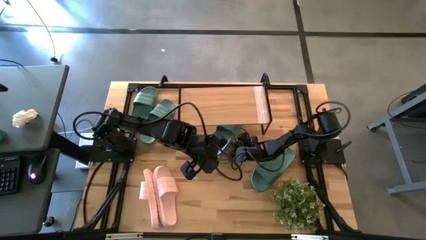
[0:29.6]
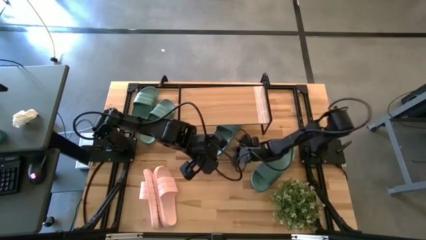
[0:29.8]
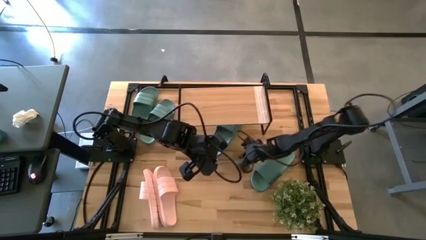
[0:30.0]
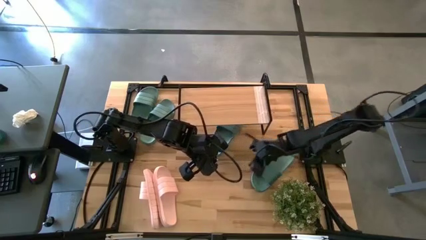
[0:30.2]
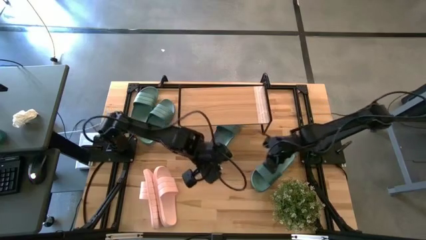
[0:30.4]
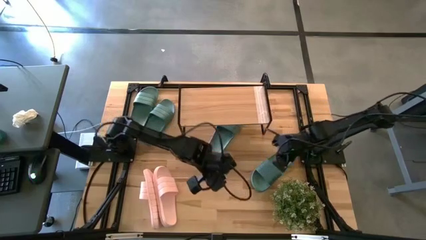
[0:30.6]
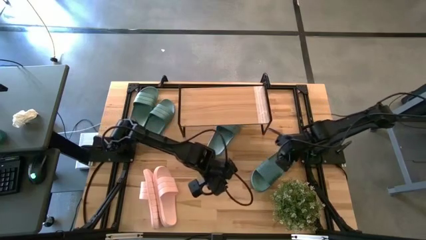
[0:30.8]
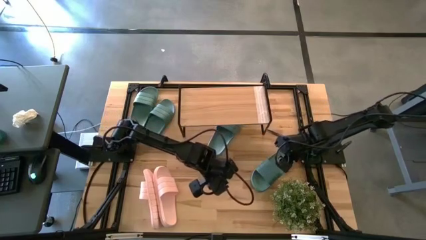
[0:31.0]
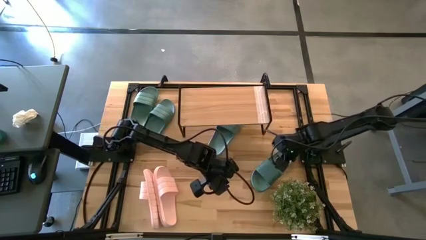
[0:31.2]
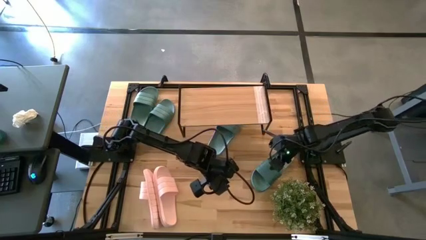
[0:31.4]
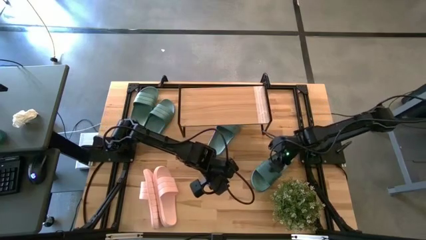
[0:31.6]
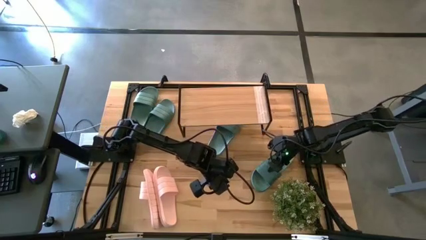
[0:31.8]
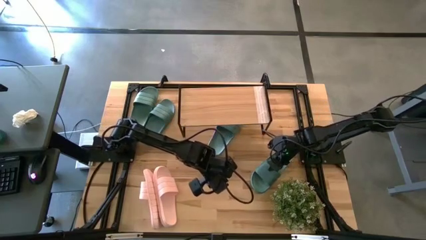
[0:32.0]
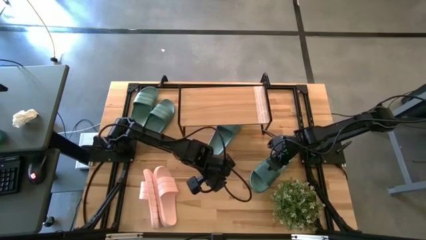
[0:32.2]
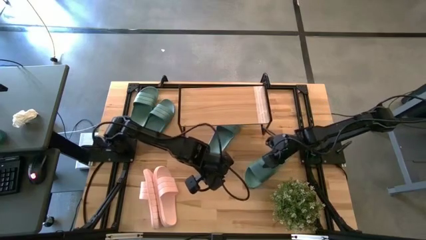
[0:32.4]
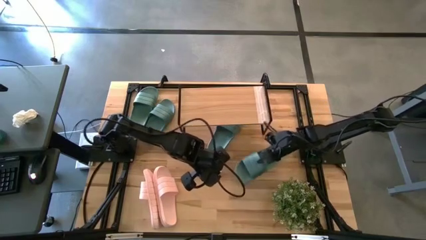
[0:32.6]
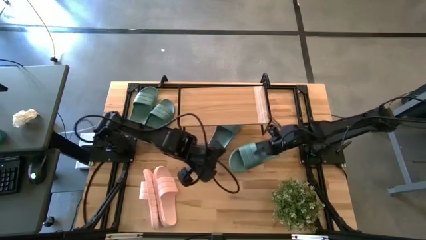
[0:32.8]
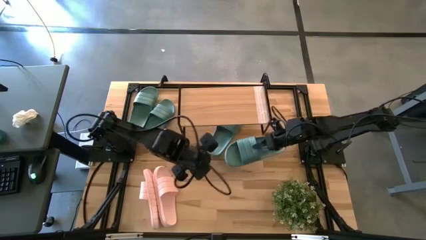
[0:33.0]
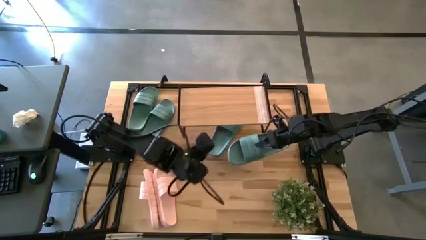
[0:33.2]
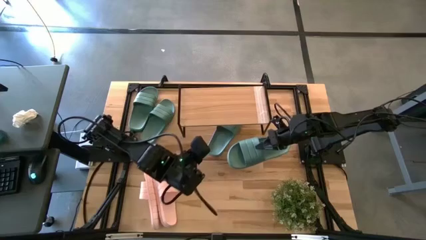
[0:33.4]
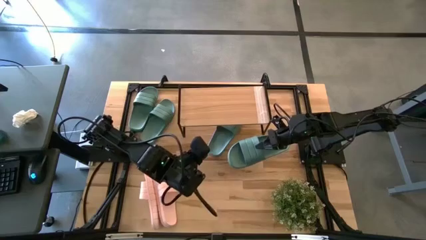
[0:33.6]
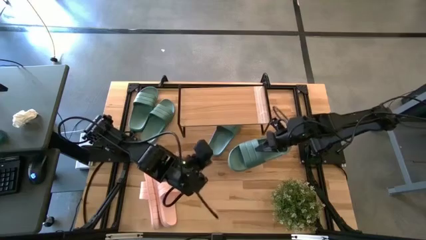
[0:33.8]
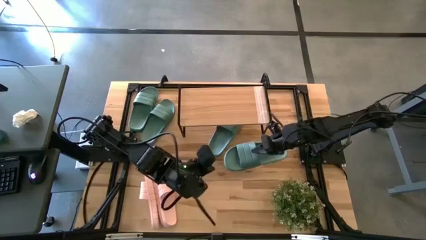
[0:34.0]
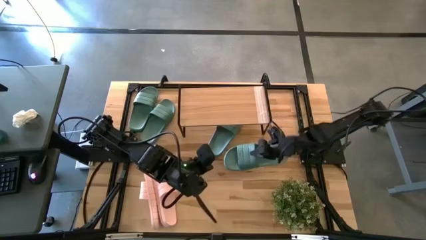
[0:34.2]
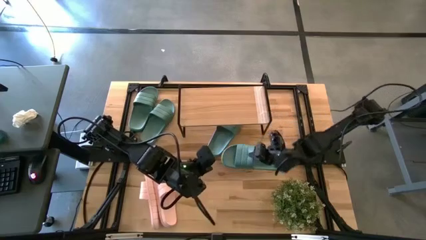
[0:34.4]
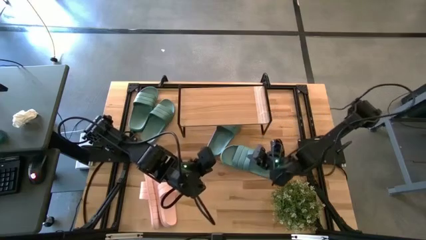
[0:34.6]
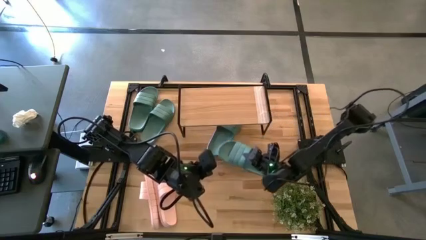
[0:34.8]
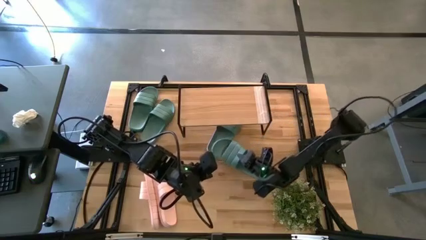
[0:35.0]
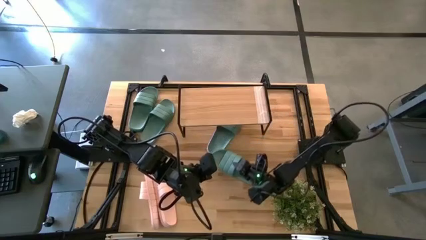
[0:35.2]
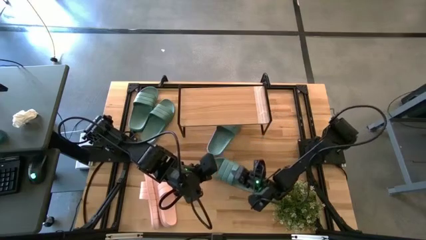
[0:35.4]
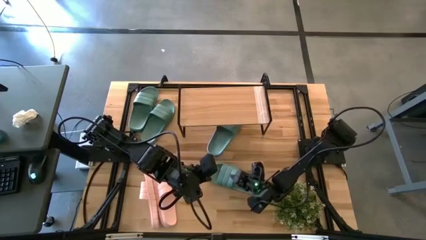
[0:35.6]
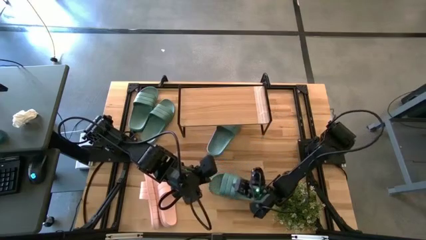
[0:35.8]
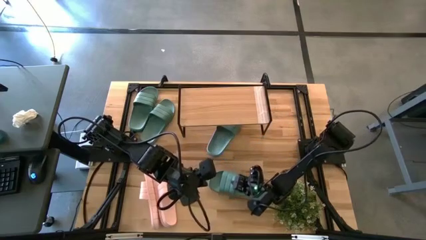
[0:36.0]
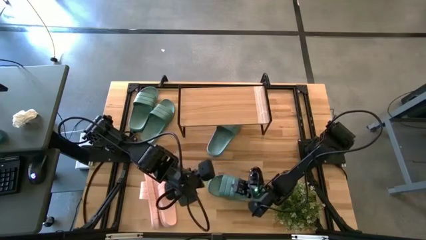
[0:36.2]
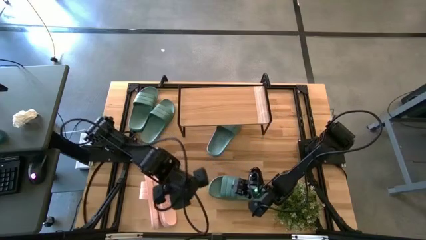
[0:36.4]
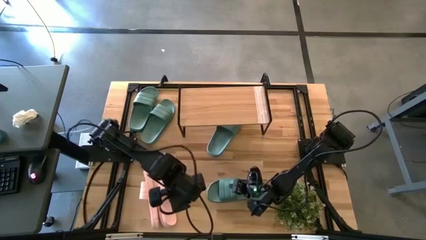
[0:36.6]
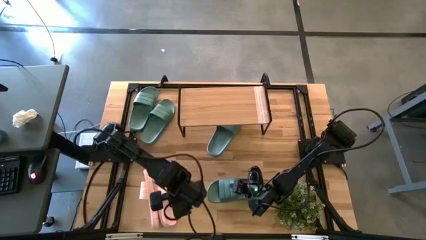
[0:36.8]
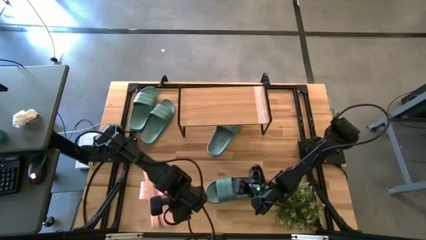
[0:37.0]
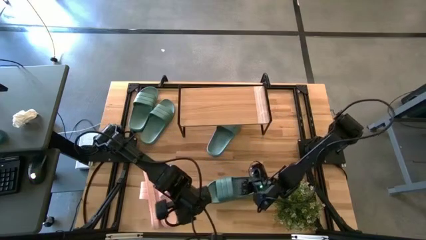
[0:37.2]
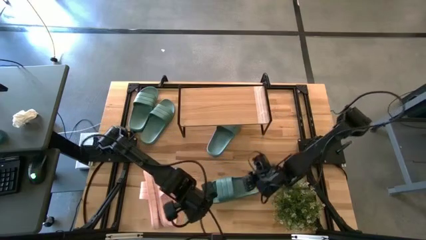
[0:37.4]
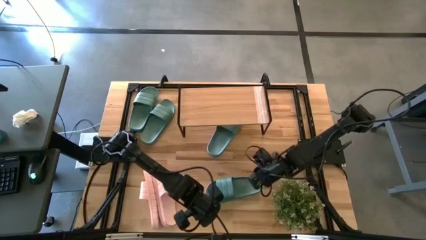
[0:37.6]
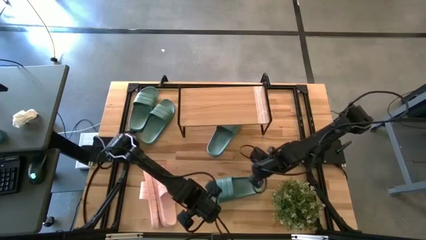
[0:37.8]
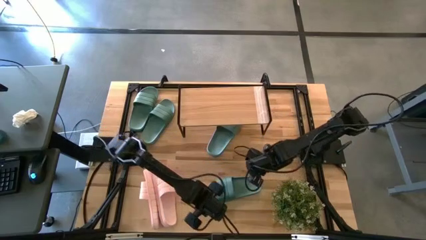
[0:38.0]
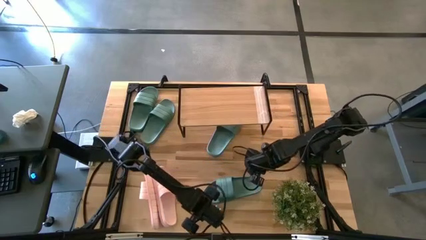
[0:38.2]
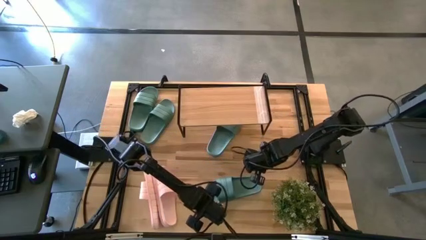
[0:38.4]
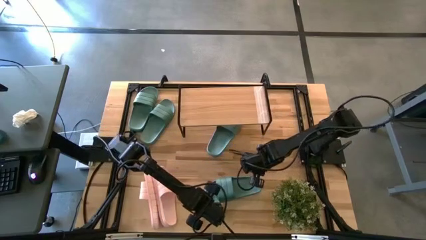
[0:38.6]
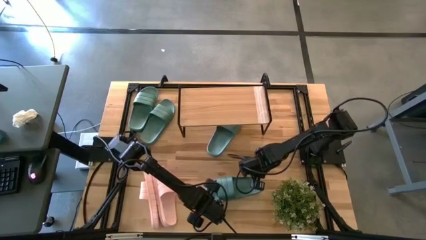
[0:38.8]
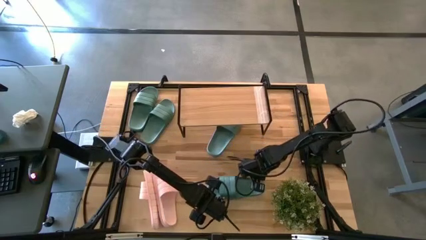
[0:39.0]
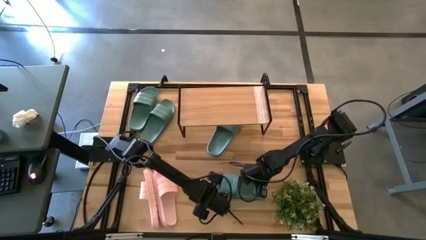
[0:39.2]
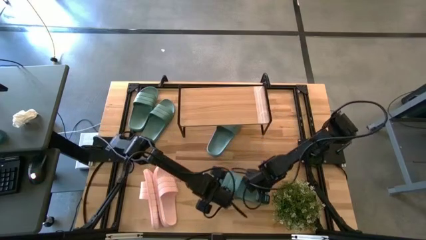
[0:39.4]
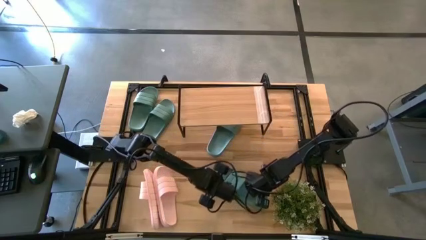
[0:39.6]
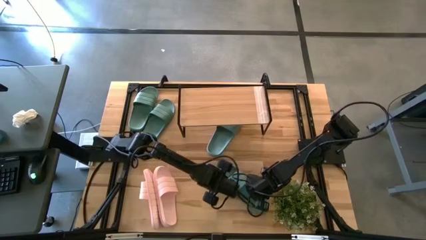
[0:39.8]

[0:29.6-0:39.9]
Task: Pick and place slides into the shelf
Put the green slide under the shelf
